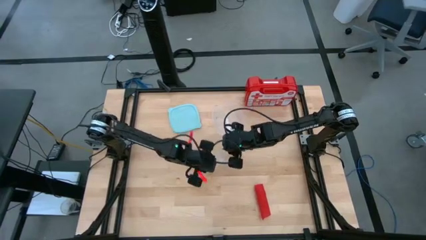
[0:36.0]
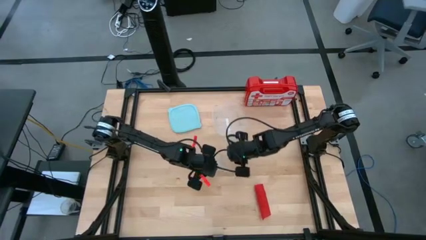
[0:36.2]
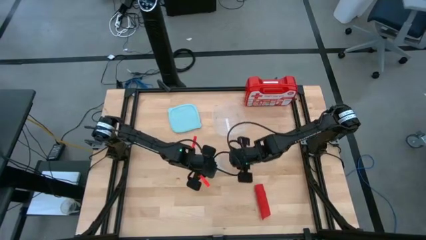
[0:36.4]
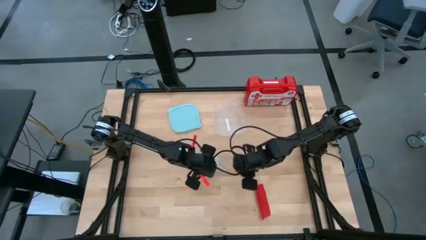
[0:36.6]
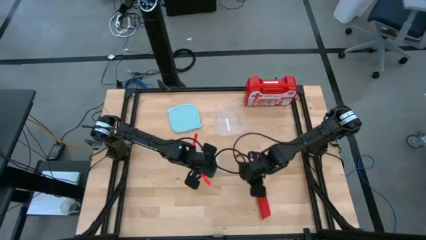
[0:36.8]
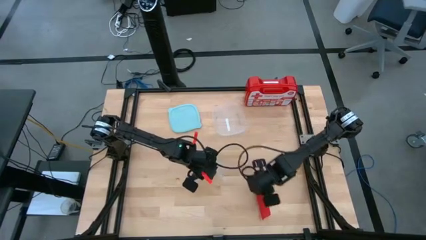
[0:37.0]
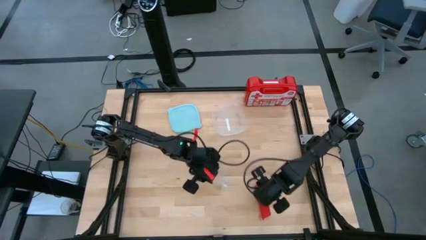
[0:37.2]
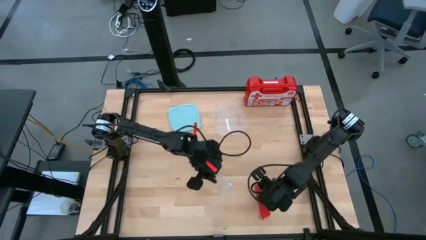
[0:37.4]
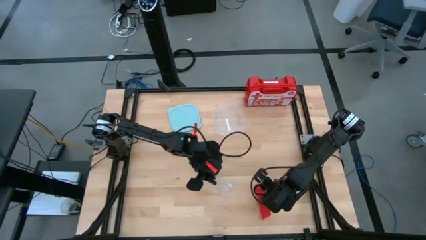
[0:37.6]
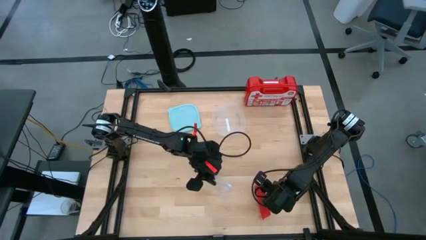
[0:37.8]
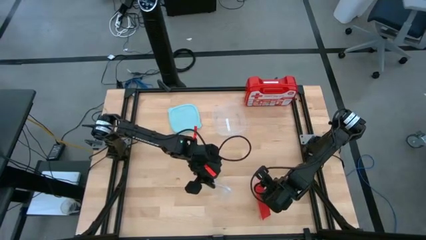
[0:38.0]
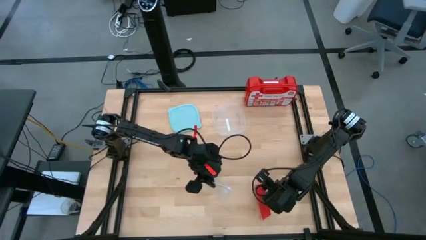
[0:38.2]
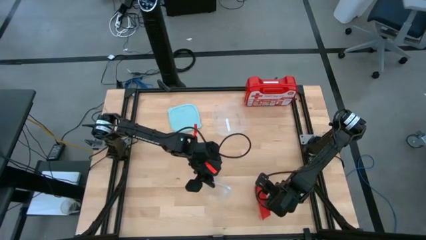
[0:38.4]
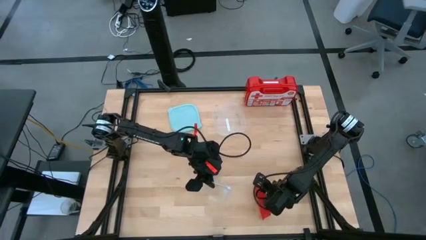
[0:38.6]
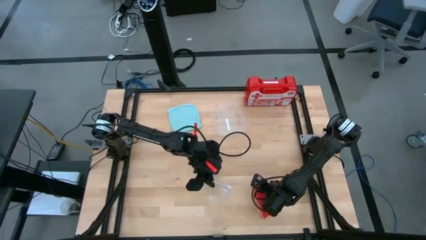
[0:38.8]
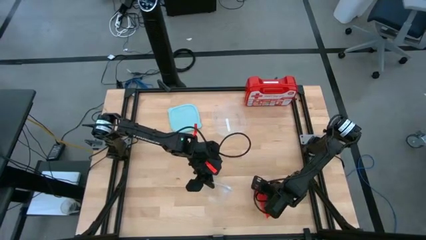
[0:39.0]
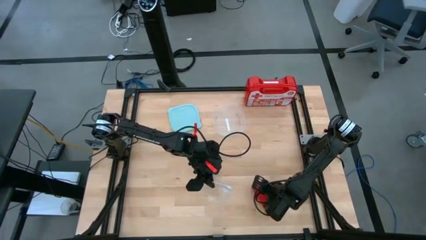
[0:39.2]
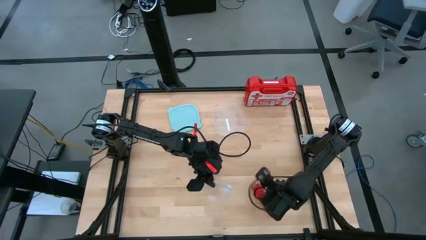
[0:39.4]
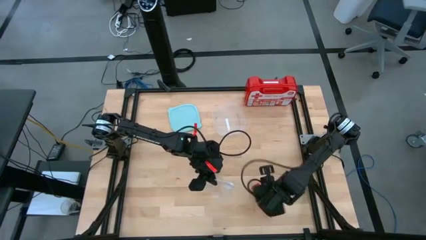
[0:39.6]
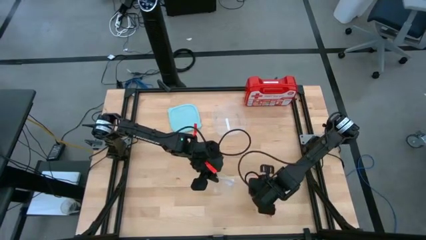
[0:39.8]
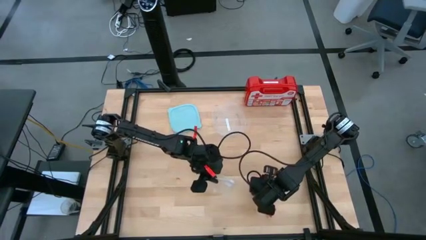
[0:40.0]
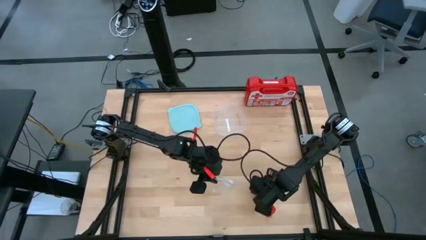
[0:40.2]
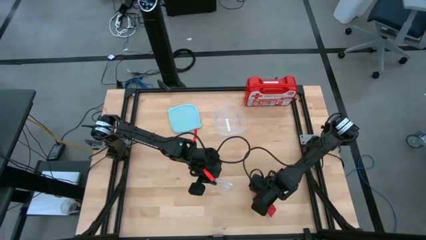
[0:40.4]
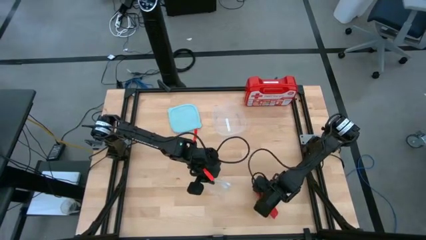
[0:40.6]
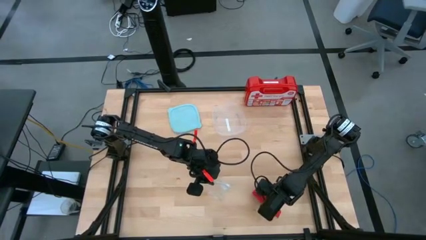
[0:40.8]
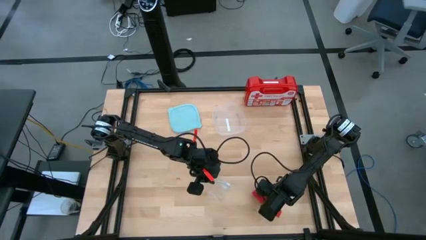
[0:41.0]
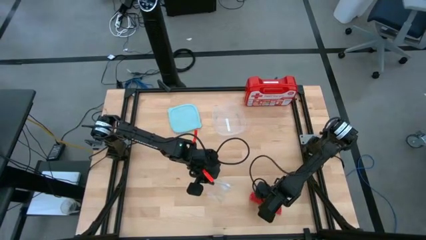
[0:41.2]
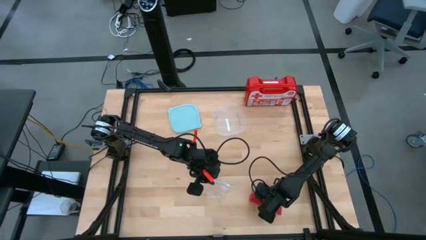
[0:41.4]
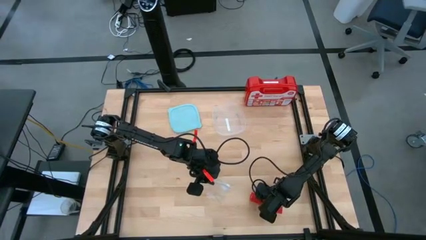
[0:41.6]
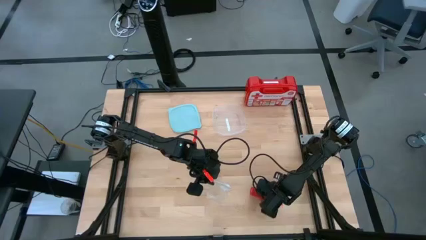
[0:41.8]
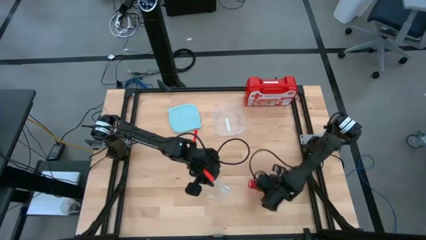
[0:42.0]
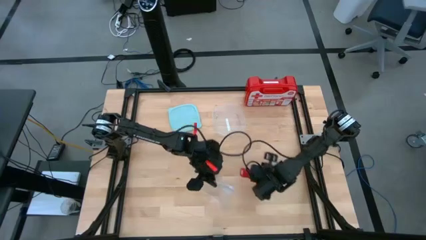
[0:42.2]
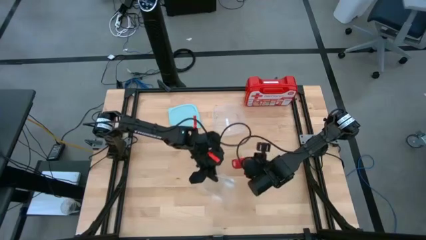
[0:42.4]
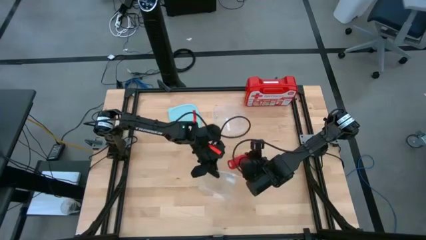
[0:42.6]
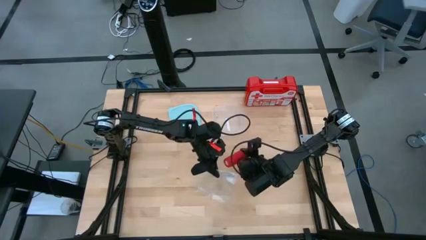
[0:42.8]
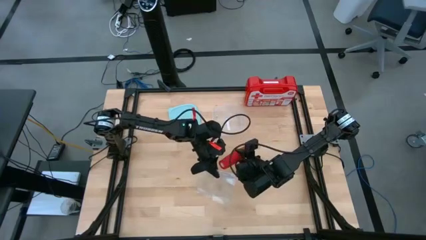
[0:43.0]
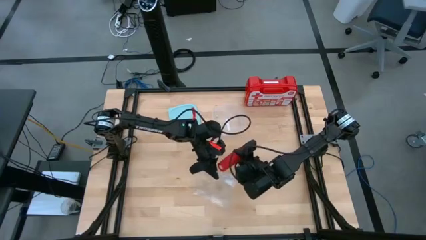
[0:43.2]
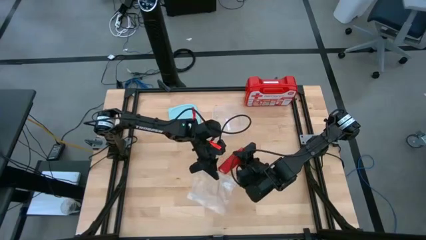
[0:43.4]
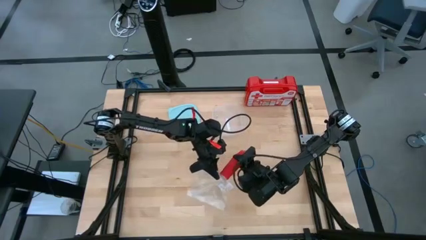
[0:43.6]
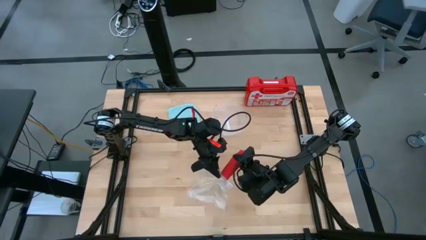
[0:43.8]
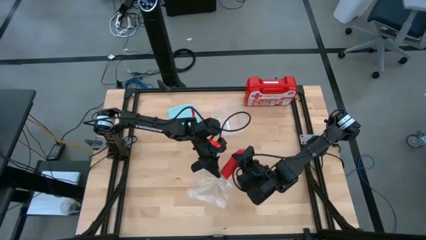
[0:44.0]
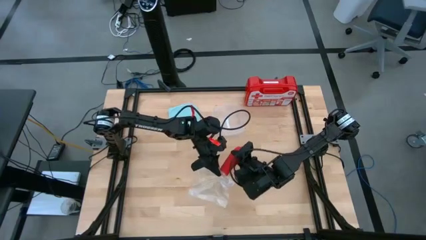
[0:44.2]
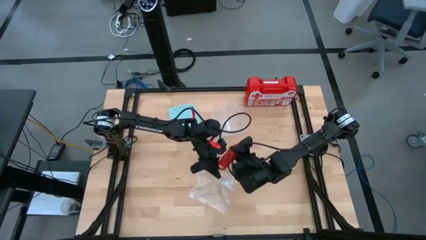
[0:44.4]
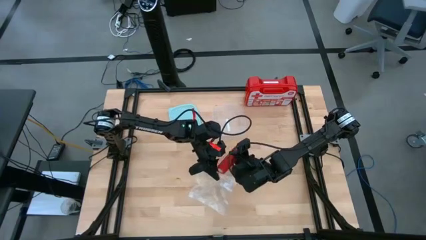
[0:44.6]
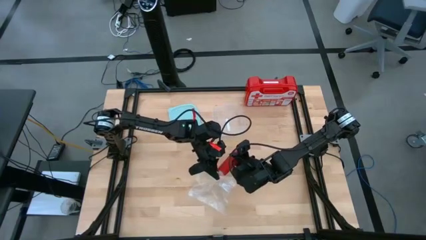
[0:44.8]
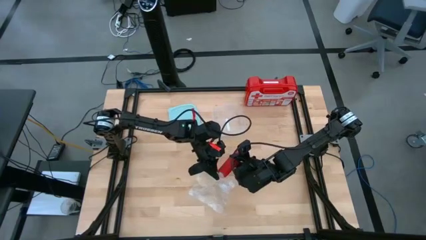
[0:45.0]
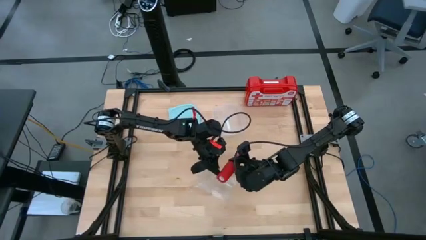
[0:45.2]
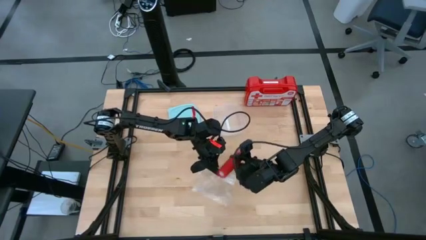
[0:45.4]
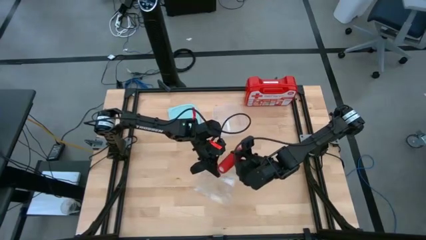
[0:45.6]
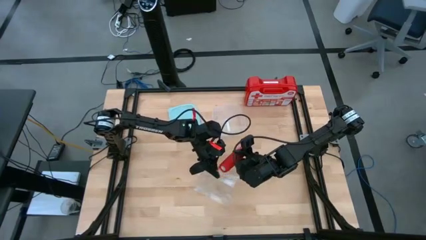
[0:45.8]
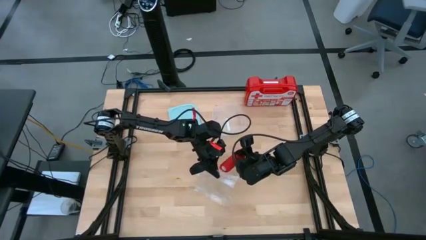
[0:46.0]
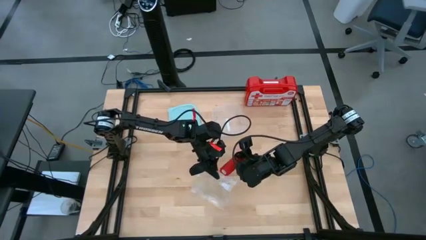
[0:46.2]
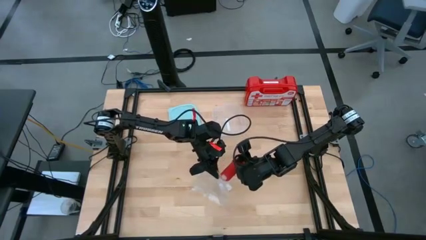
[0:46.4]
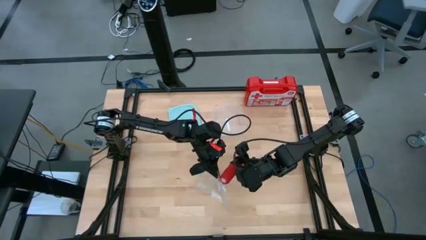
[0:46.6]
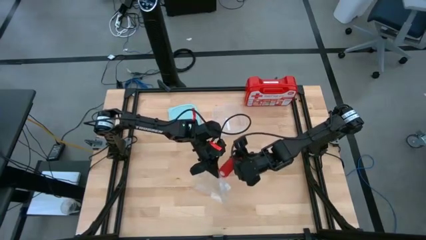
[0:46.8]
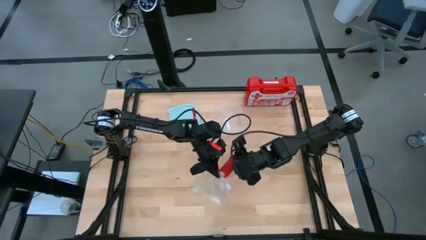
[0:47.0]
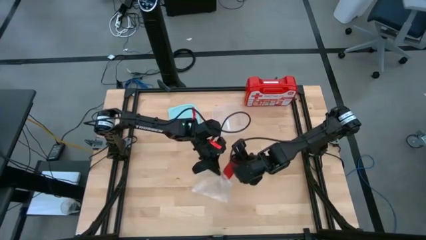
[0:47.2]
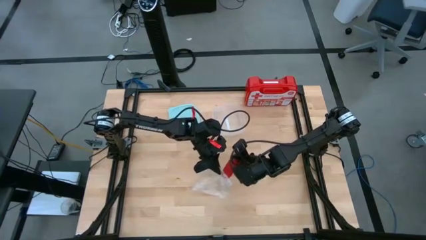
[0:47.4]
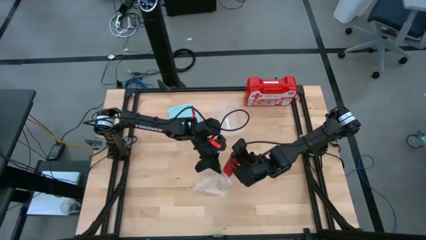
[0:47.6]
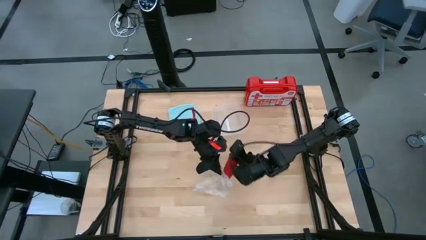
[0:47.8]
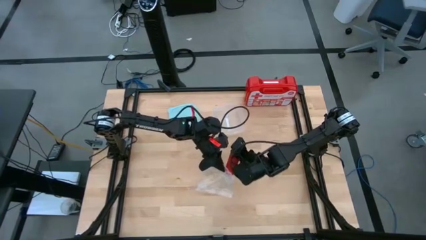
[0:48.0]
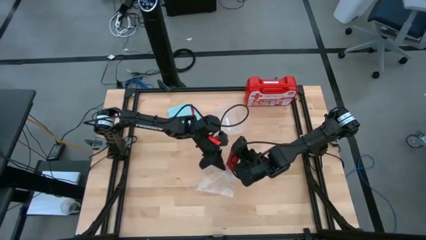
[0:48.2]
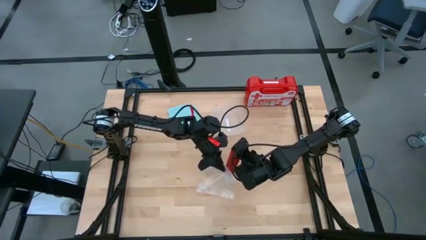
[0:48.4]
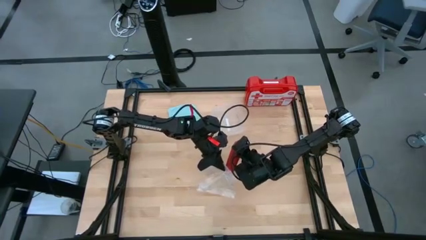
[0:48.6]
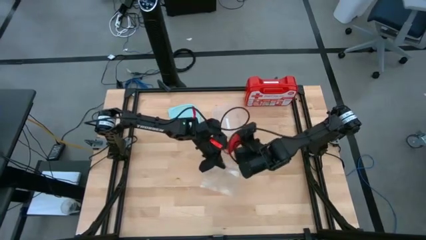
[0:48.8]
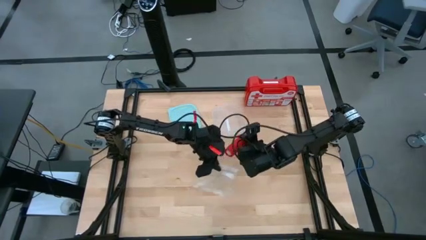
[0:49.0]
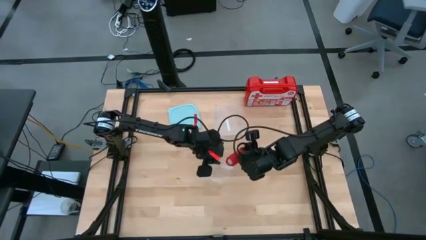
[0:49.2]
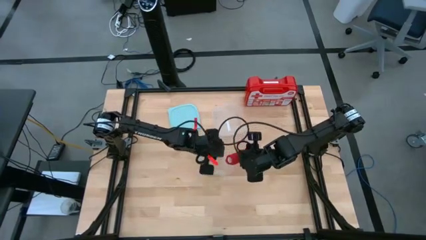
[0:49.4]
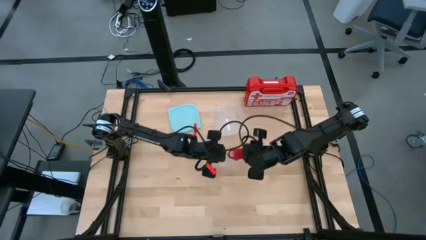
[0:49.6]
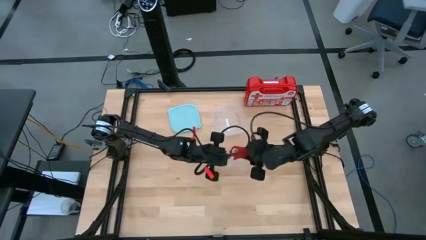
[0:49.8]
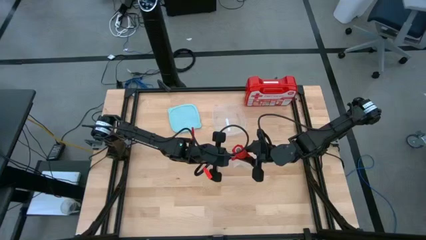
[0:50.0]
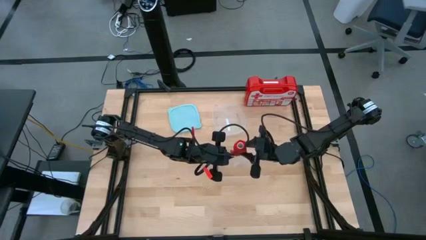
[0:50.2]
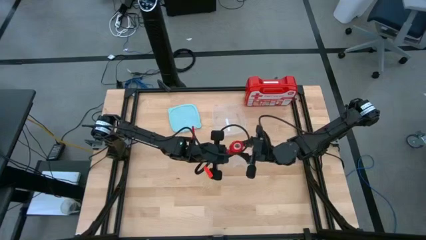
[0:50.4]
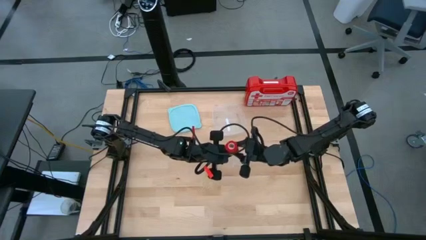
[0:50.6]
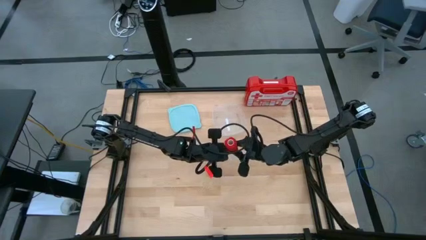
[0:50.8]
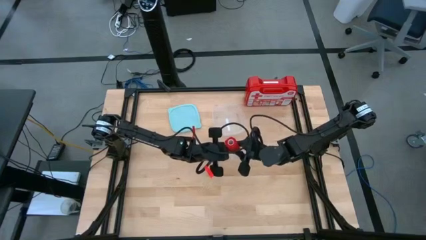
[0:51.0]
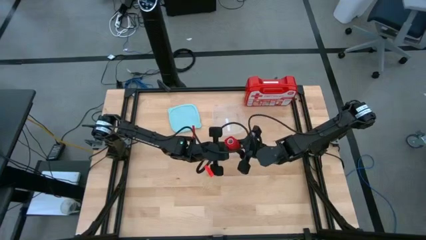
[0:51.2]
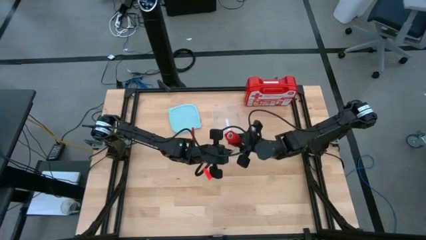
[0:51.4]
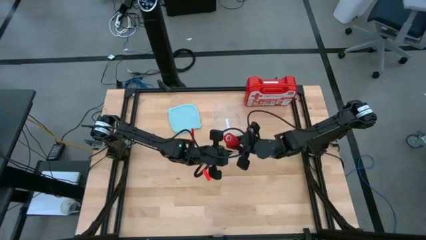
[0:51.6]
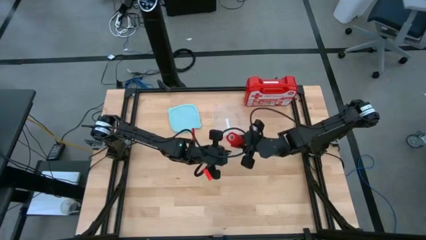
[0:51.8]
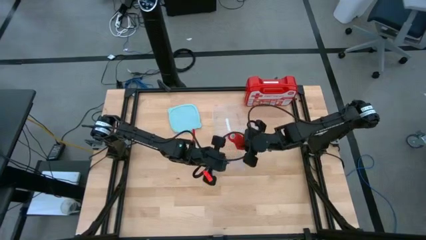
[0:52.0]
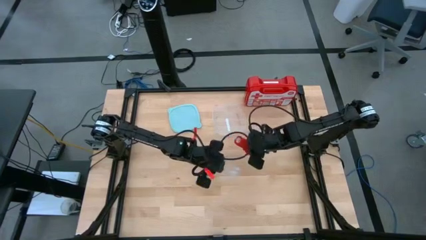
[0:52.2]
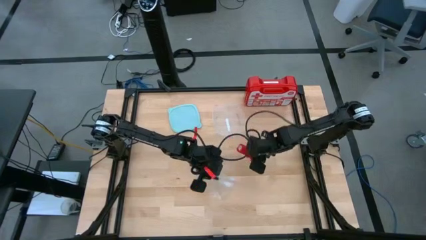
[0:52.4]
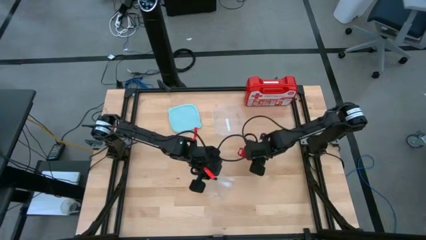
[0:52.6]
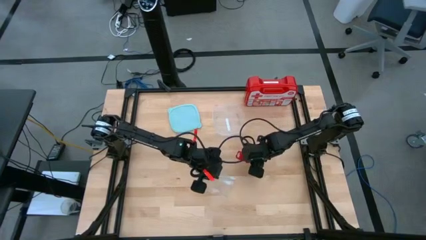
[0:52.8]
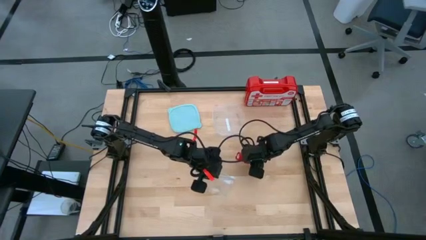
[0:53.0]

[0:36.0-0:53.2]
Task: Roll bandage
Put the rolled red bandage into the transparent zip bag
